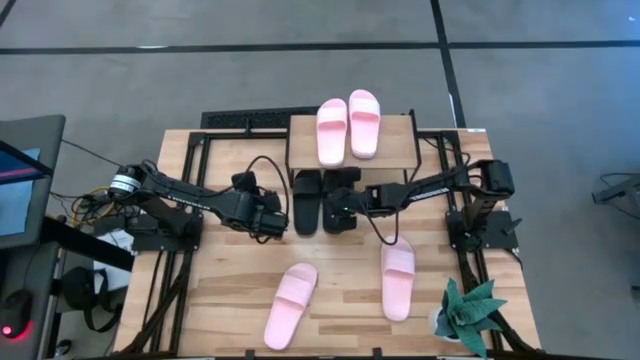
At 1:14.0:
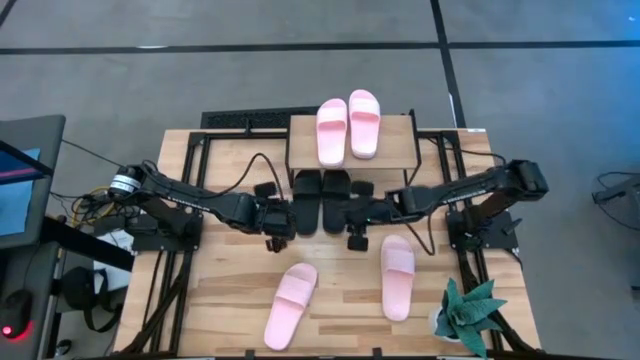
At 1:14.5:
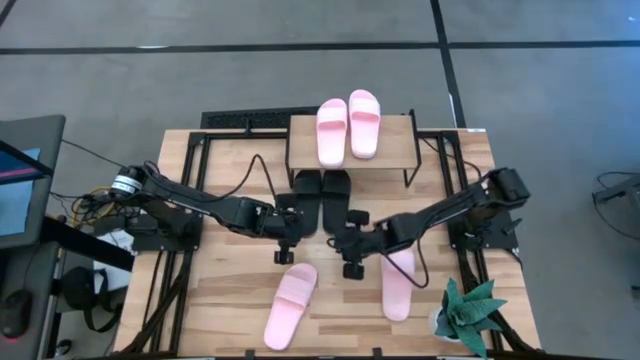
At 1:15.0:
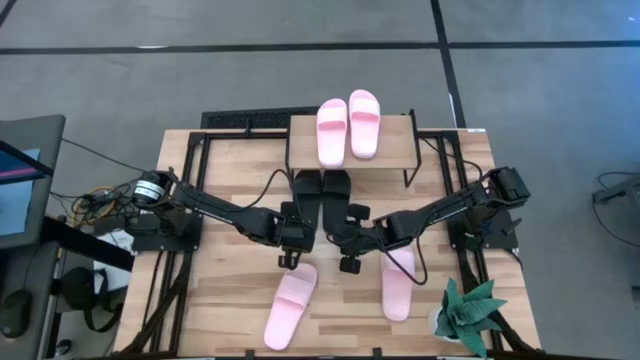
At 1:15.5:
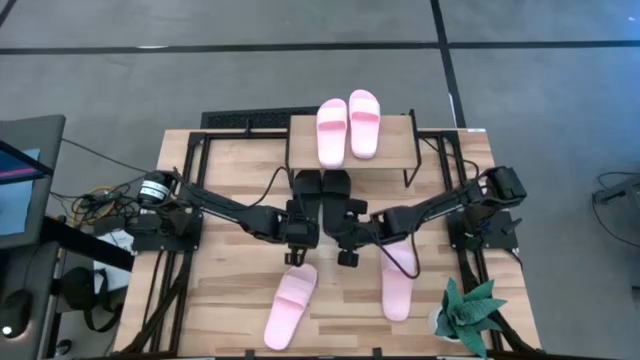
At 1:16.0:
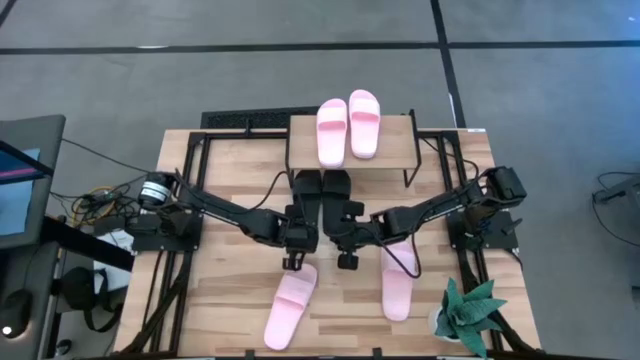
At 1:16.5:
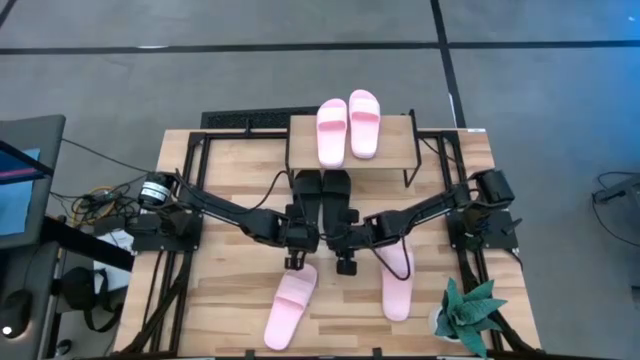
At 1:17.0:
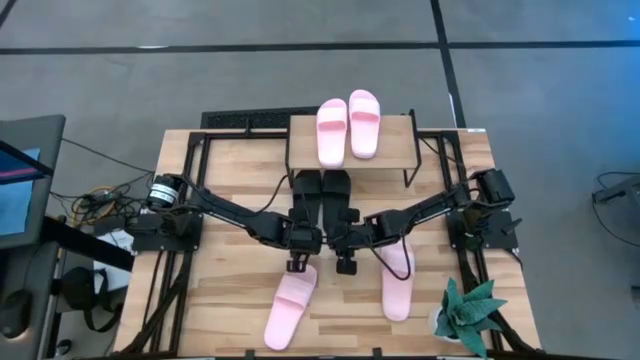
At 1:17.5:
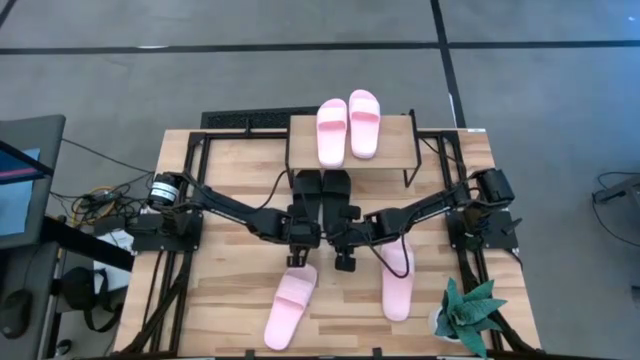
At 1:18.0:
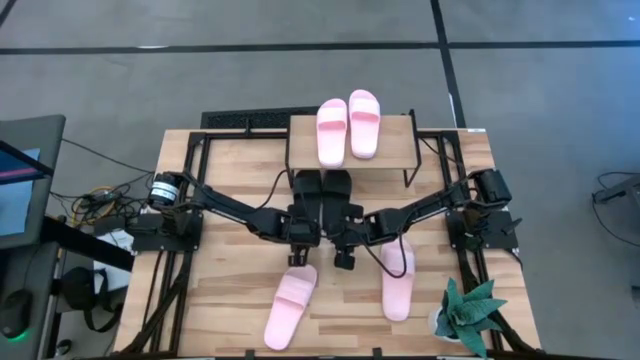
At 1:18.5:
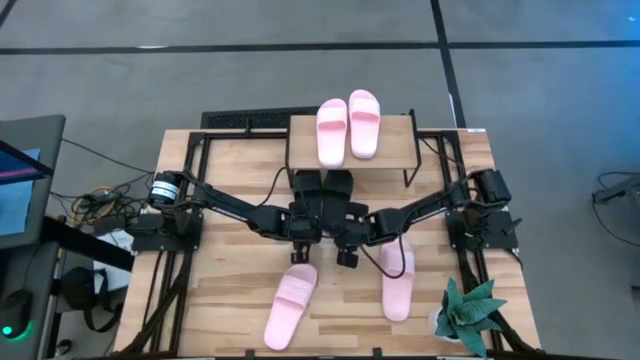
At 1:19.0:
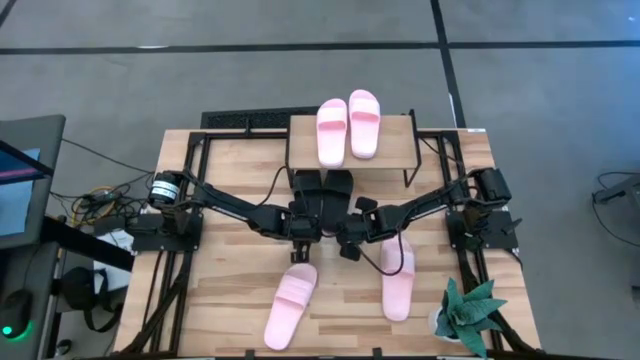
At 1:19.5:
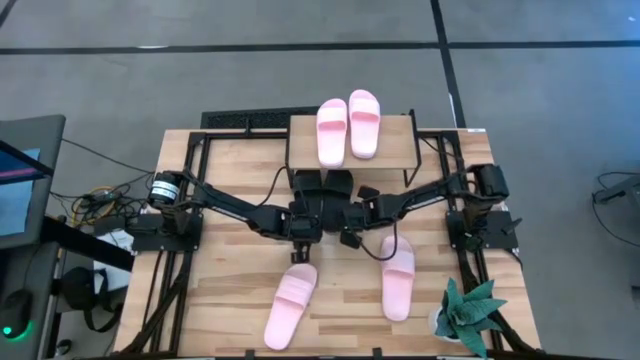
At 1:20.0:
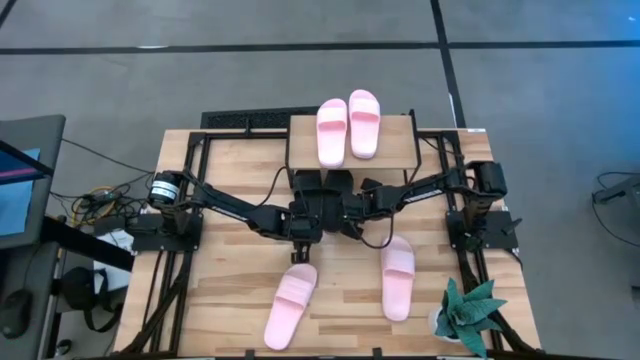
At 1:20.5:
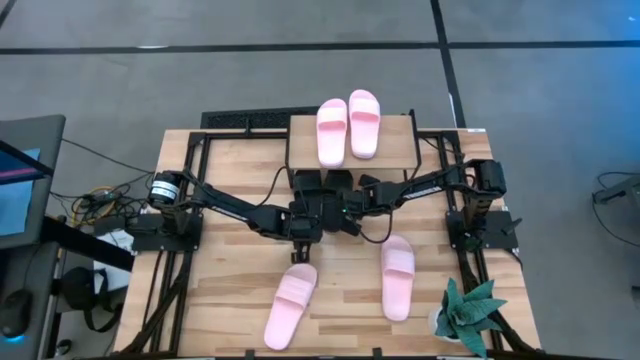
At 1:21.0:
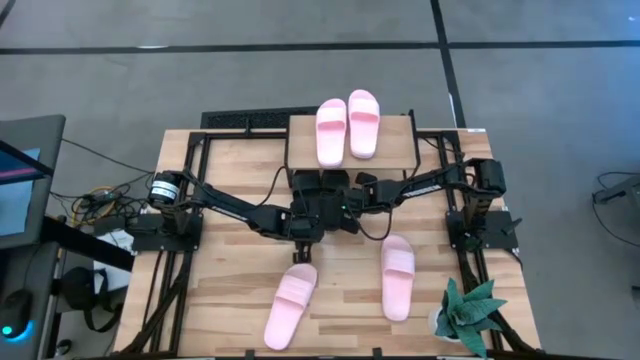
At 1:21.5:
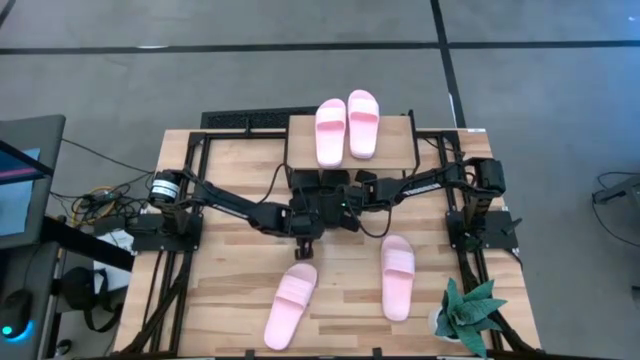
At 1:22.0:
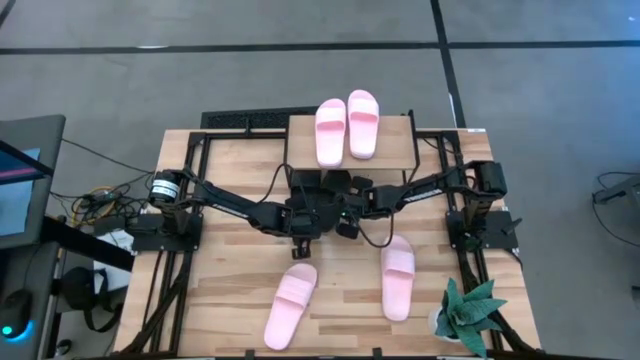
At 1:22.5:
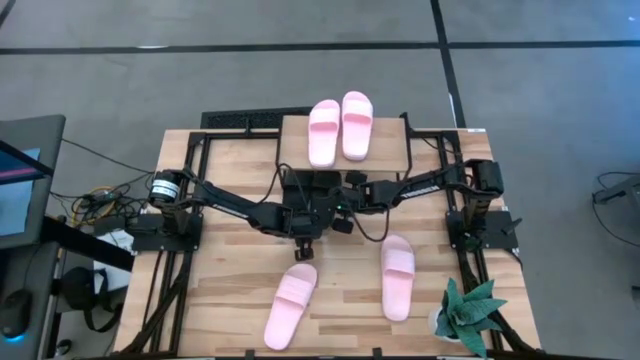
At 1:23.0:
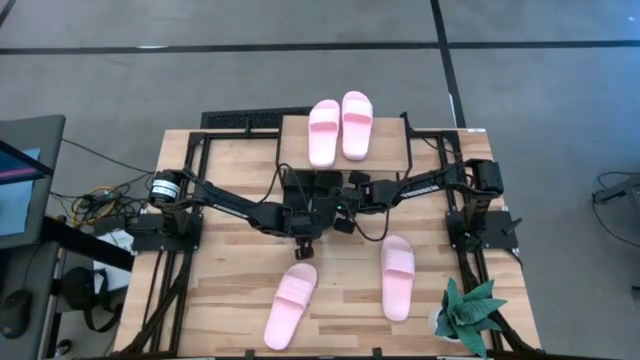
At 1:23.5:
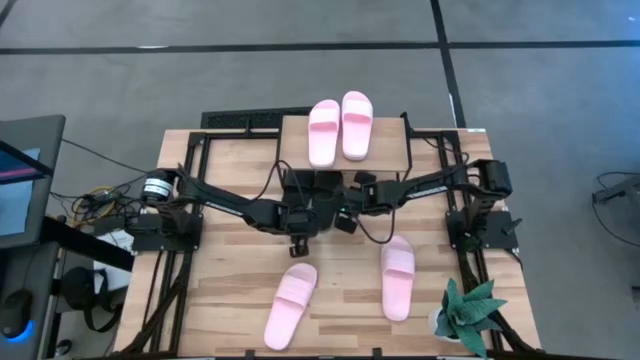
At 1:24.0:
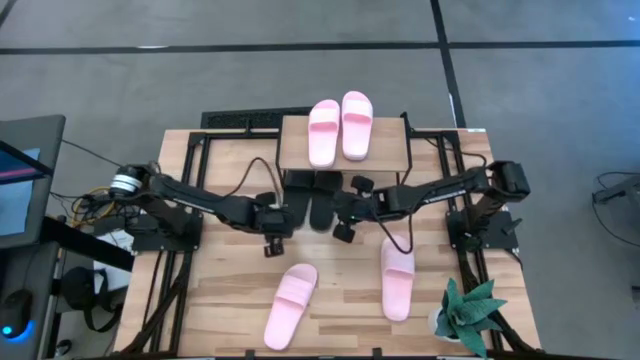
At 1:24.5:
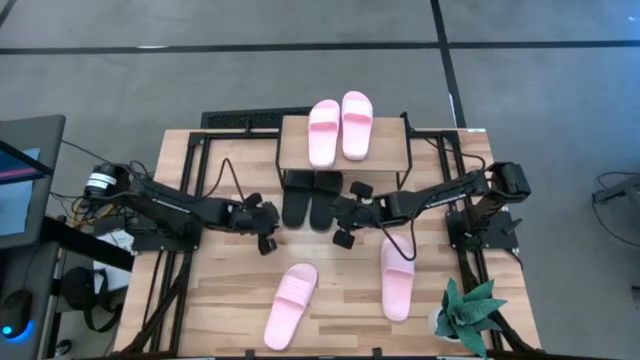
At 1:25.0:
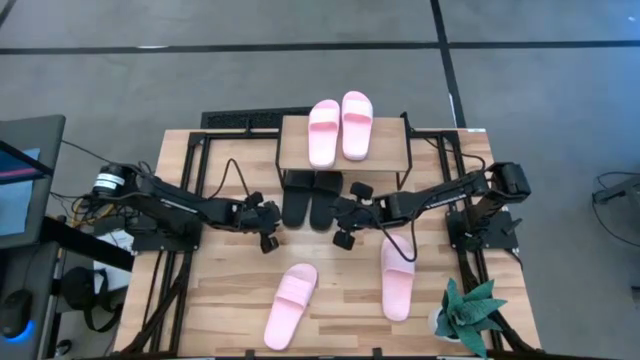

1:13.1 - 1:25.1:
Task: Pick and place slides into the shelf
Adjust the black slides under the shelf

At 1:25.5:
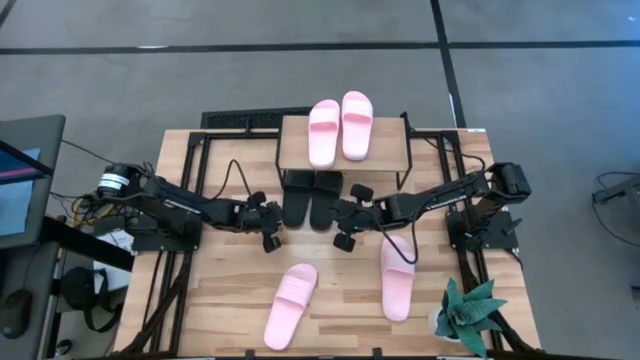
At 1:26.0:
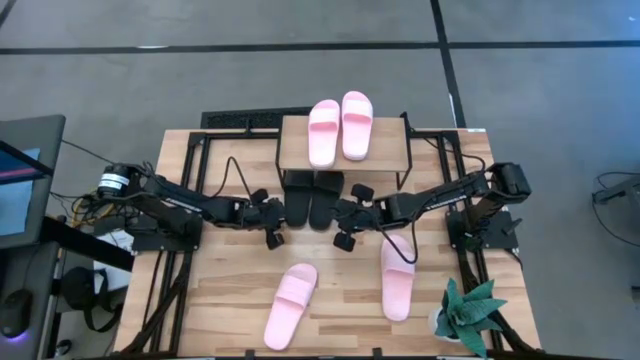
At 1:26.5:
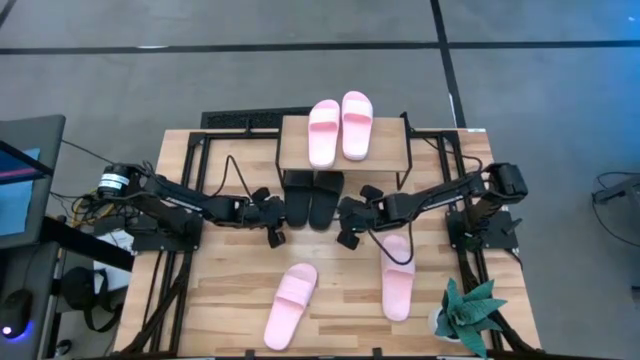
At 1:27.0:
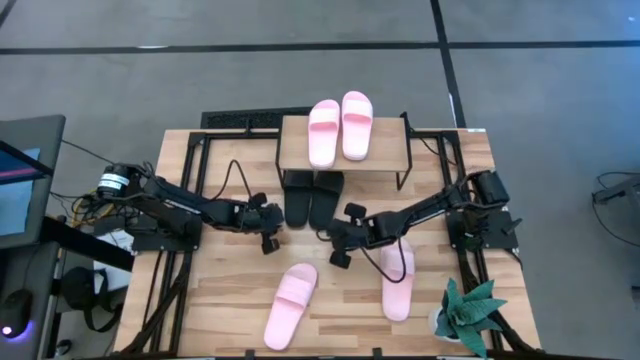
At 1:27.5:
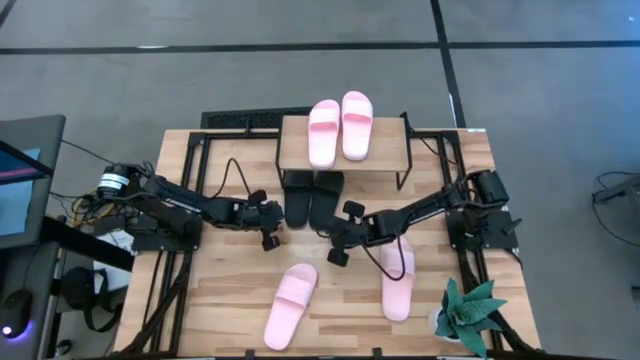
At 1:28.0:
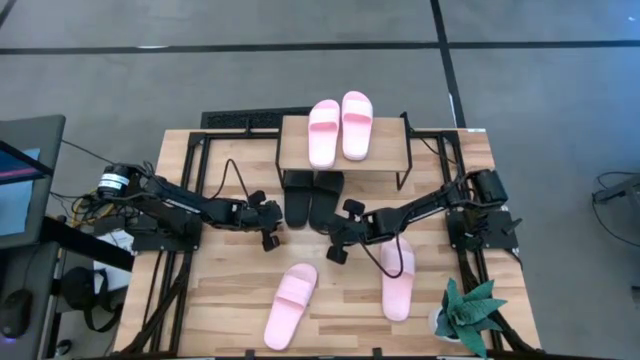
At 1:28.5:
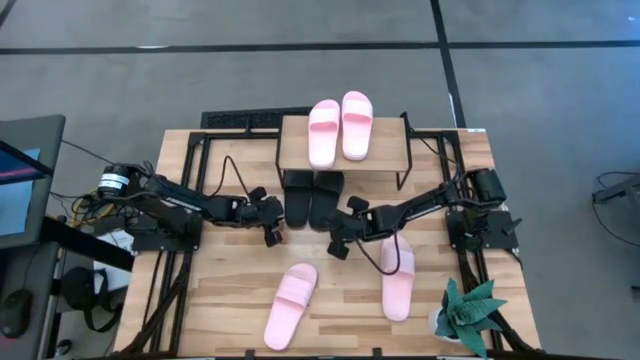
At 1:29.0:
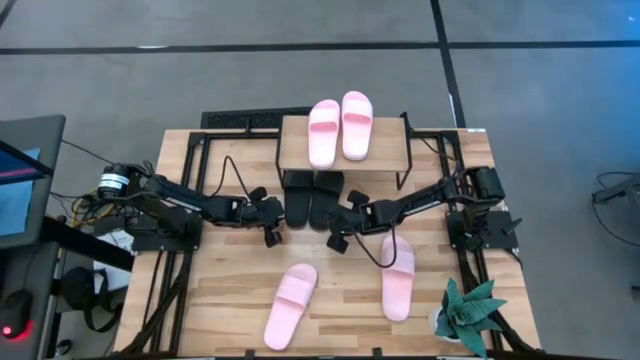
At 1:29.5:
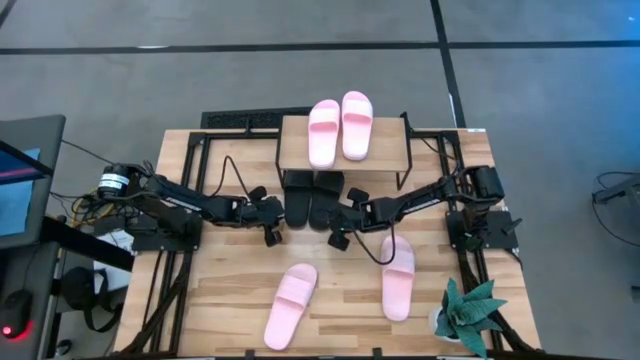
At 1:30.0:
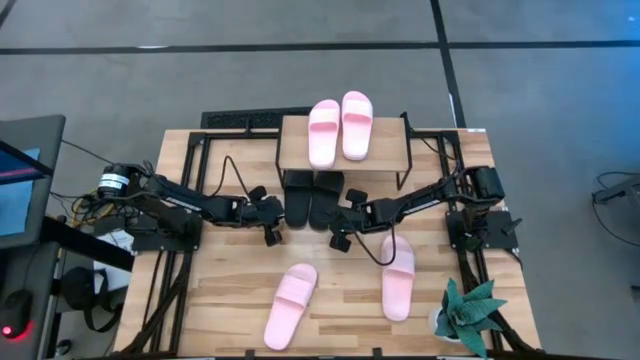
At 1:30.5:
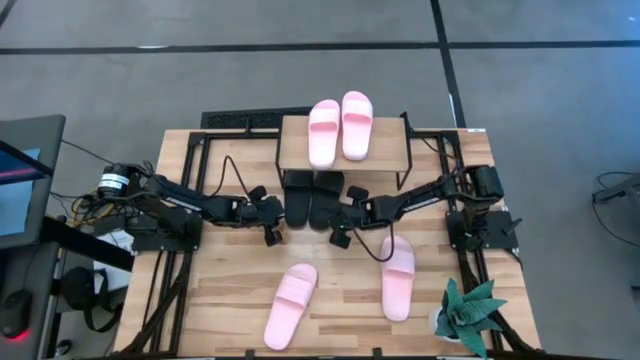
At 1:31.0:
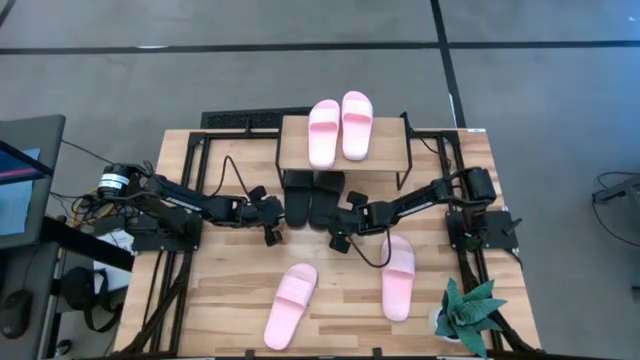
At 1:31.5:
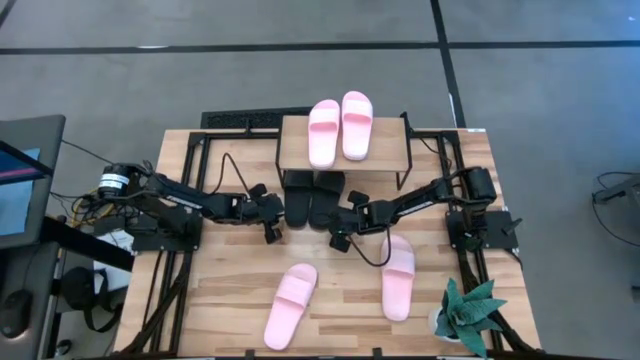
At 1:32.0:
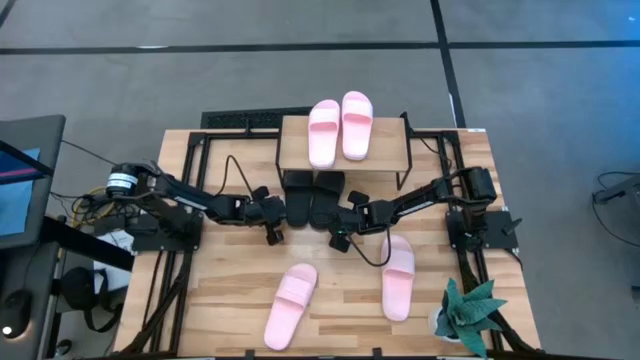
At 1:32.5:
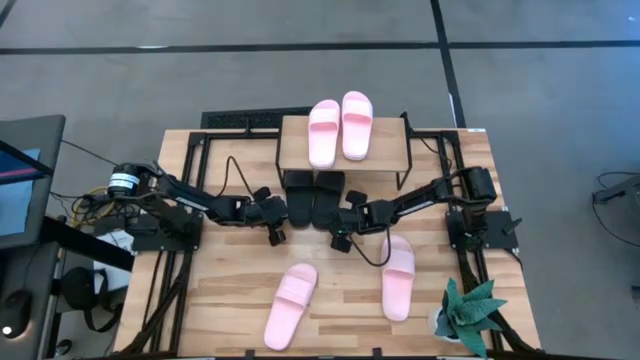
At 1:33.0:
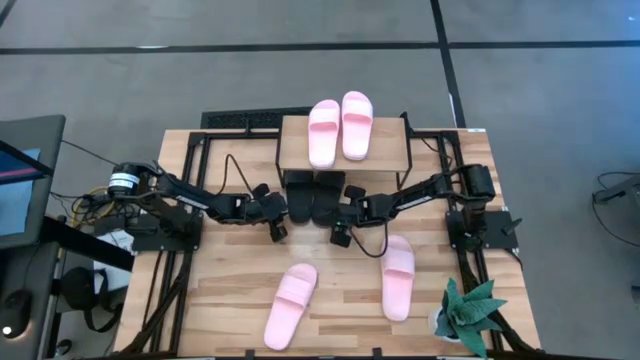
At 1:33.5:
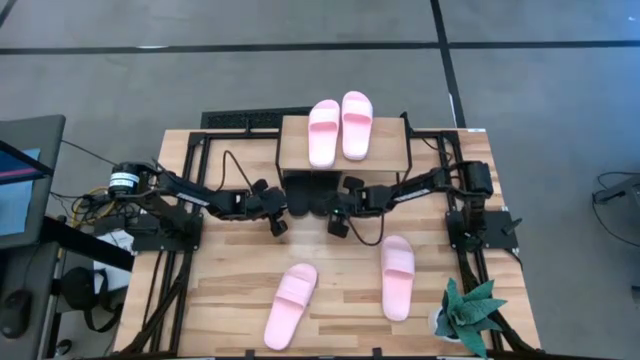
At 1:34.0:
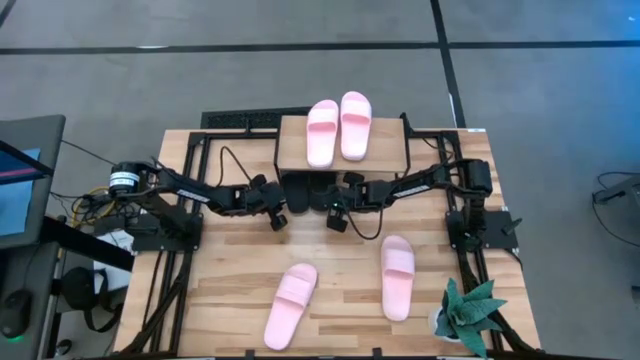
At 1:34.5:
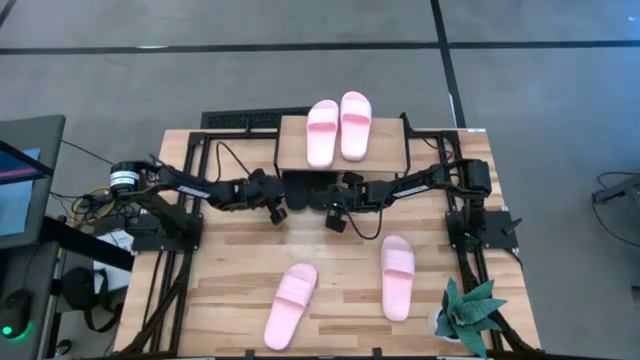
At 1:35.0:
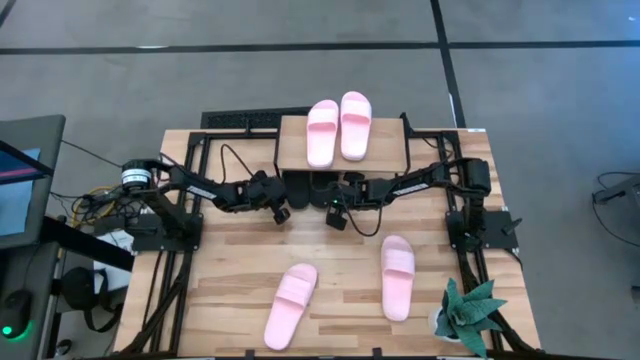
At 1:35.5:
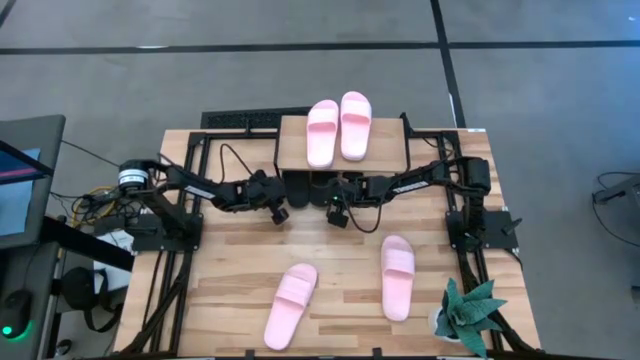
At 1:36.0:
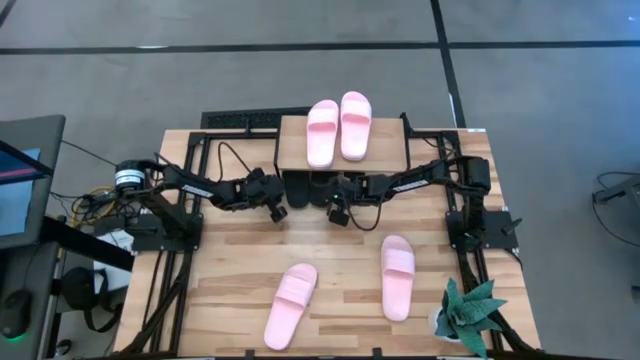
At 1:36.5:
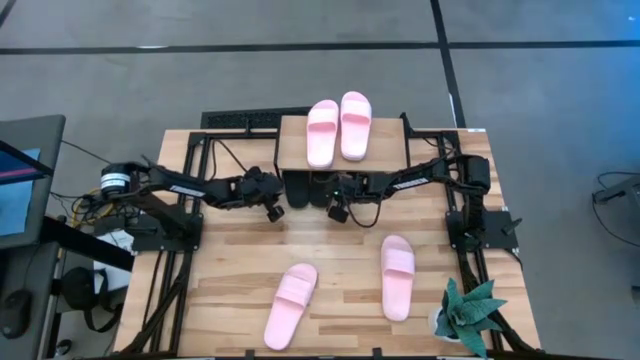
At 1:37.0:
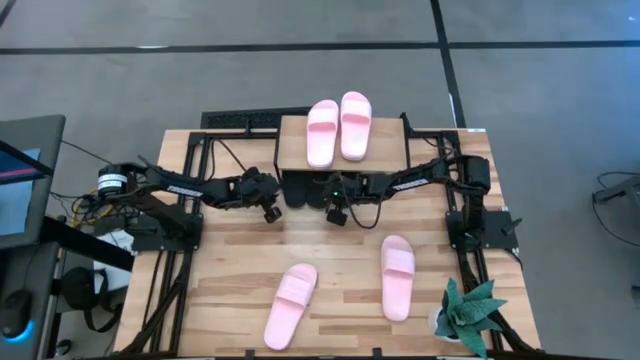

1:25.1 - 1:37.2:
Adjust the black slides under the shelf
